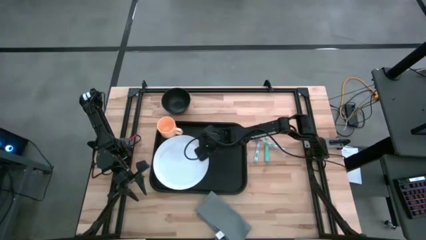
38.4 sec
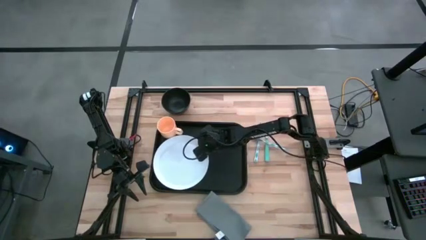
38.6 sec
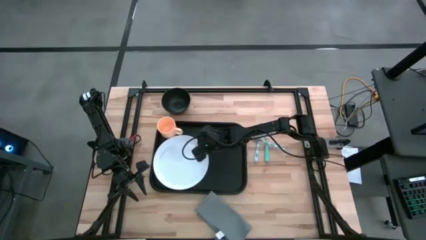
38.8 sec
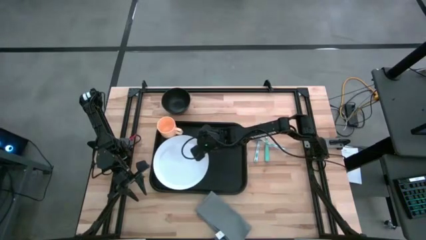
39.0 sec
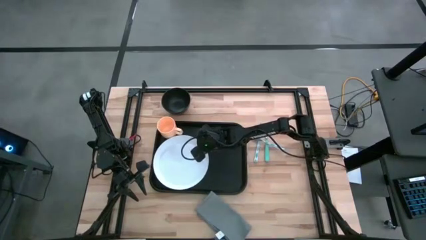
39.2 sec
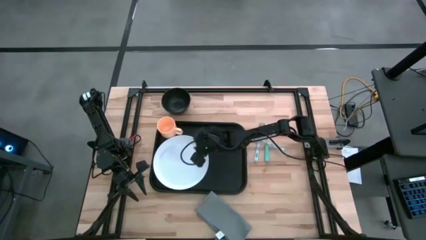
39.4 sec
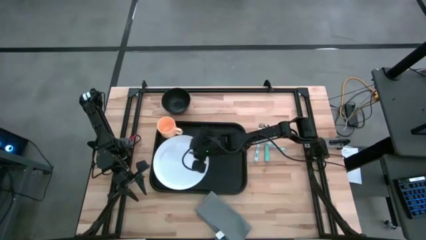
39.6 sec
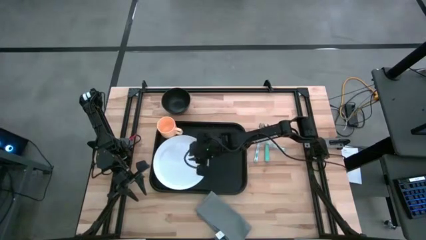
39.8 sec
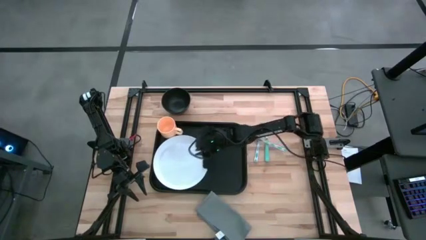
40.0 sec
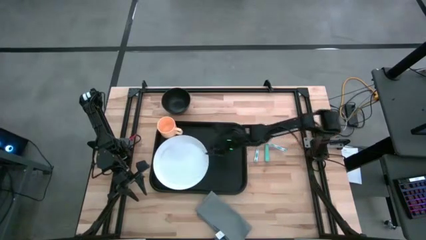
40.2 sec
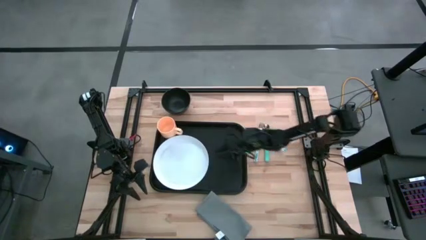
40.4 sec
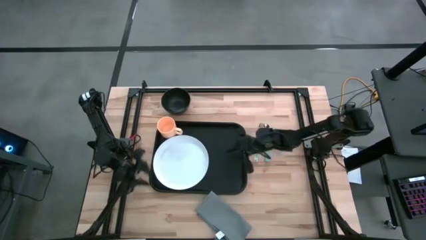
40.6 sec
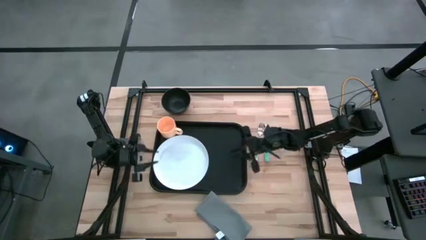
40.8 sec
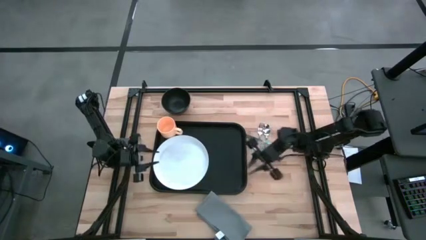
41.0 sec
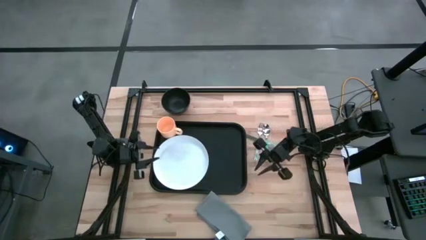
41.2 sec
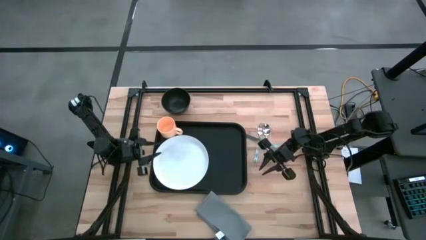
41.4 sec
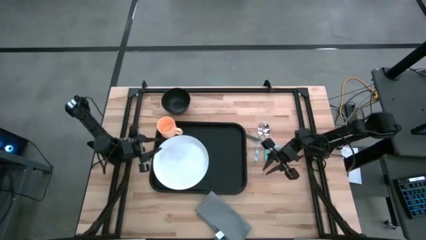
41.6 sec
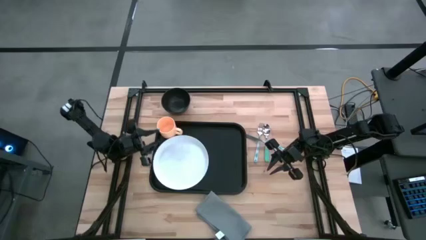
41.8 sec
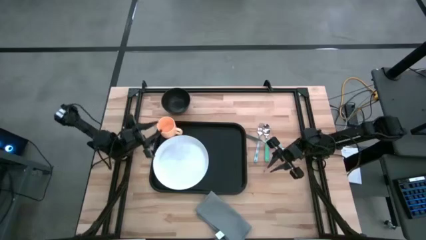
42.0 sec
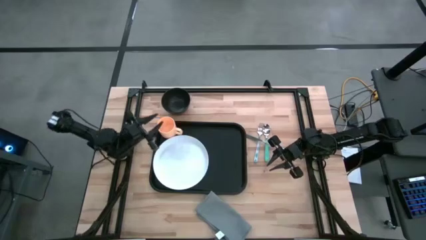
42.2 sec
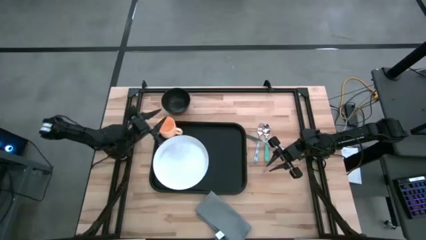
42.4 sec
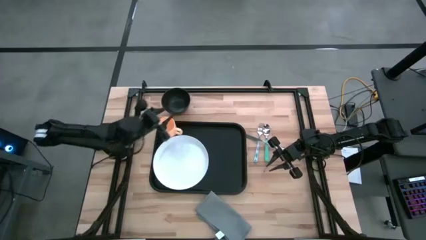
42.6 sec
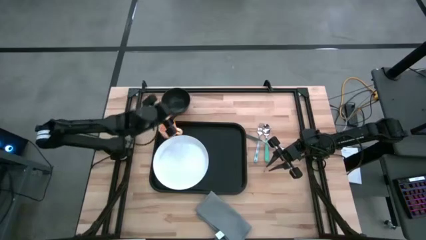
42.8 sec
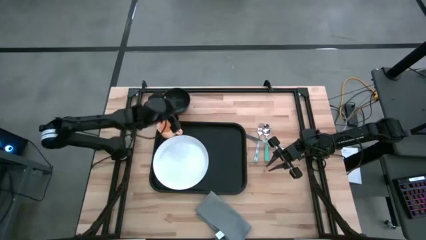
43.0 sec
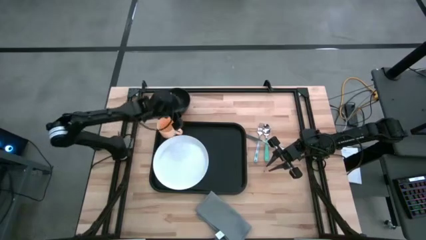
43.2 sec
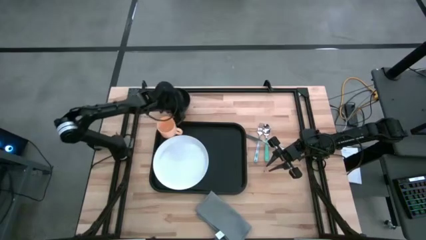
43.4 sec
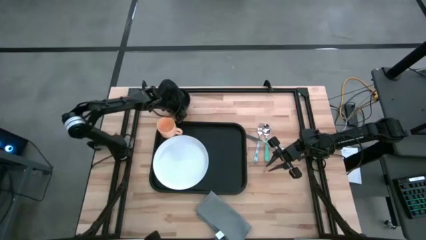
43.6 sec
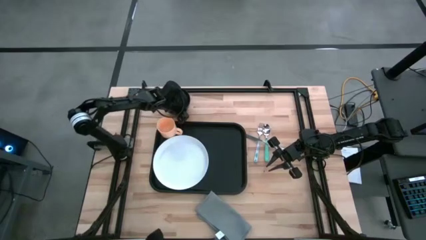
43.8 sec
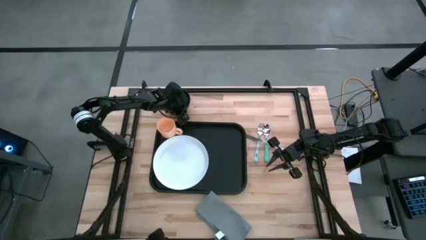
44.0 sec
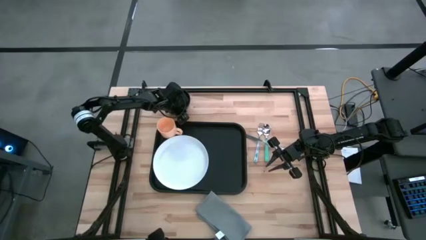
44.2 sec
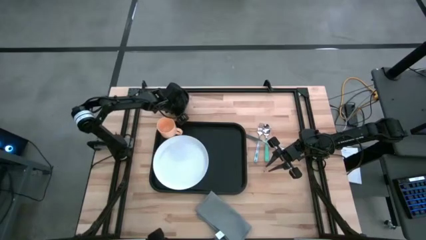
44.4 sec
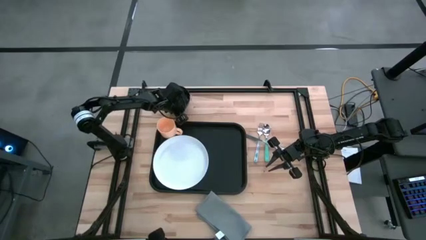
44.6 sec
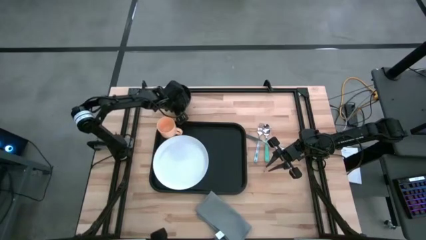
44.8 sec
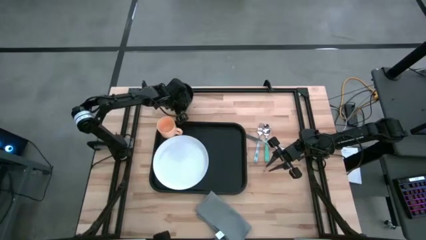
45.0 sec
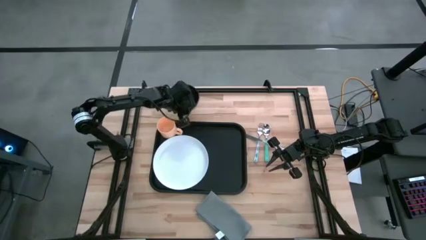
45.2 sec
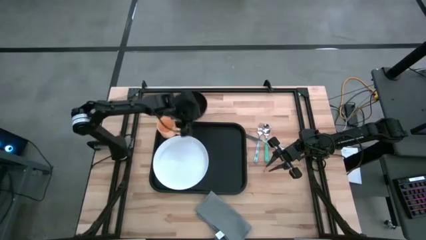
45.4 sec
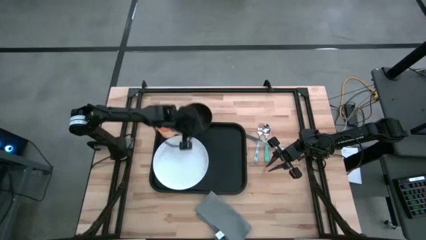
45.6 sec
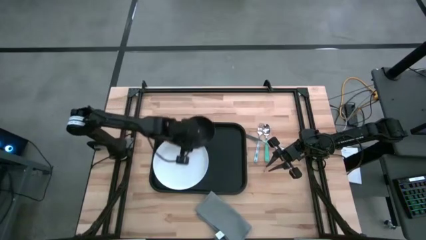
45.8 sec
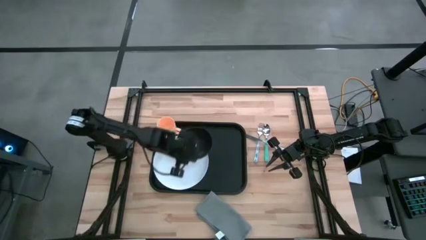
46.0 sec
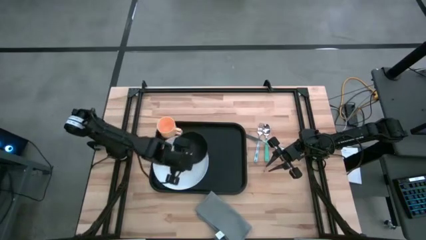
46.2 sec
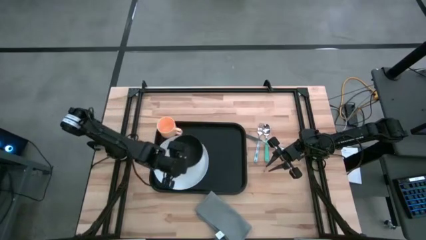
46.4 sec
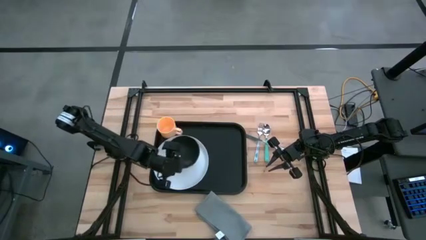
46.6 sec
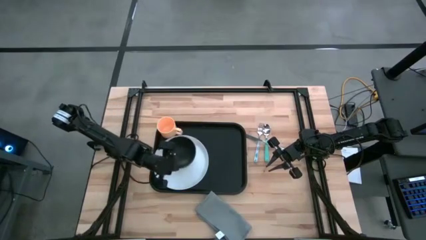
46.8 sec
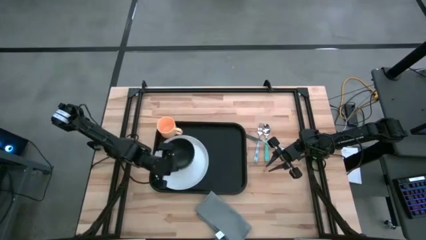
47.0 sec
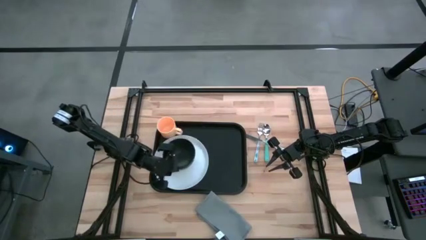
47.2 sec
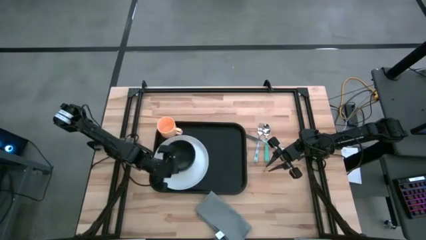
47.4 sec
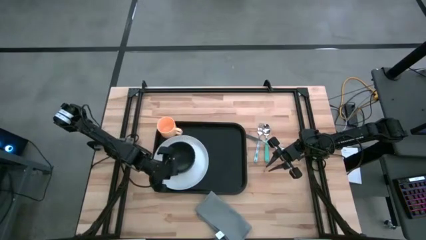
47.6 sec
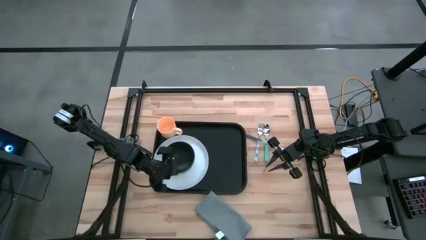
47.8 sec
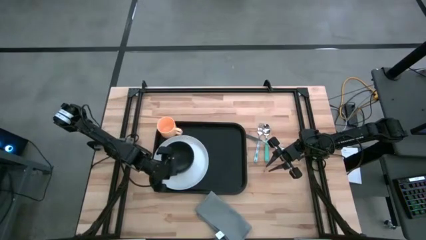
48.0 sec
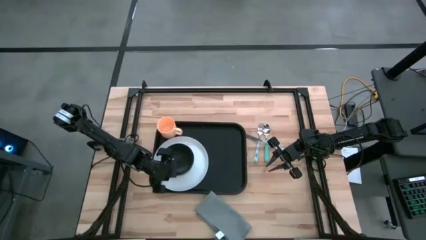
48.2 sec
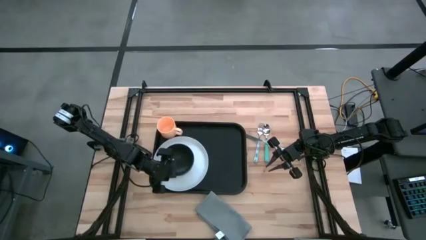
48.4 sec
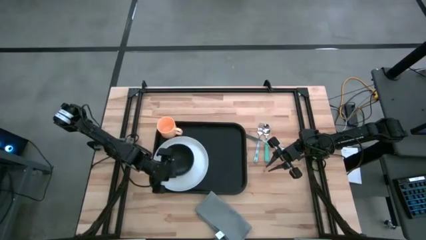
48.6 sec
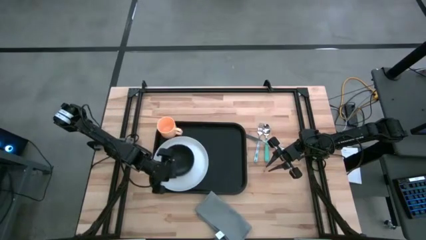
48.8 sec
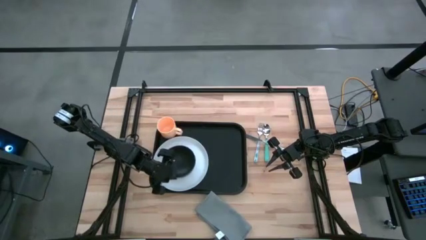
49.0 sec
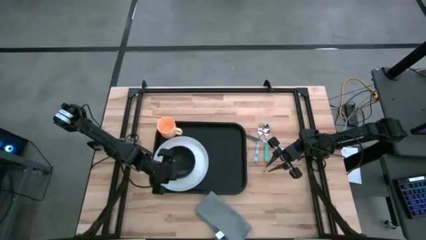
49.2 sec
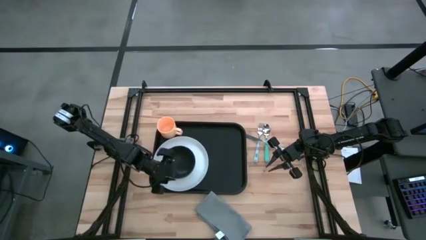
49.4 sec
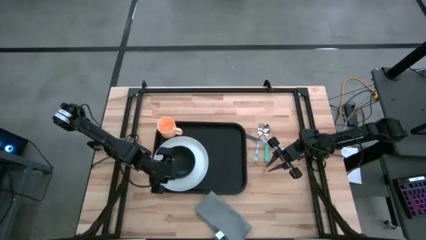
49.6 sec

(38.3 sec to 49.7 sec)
Task: Set up tray
Put the black bowl on top of the white plate
